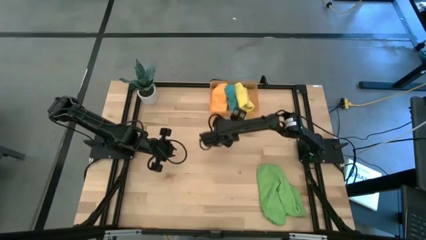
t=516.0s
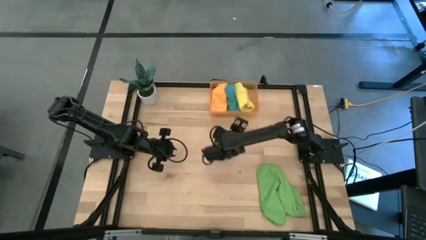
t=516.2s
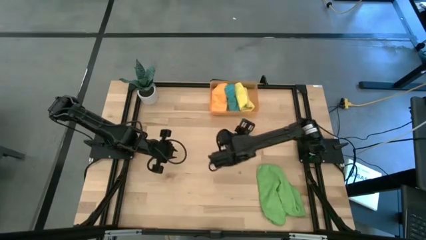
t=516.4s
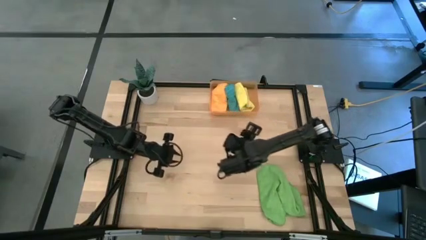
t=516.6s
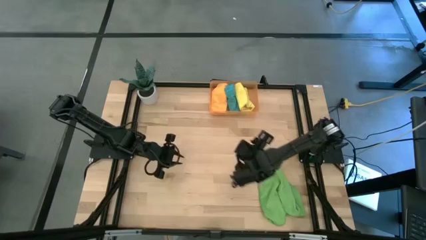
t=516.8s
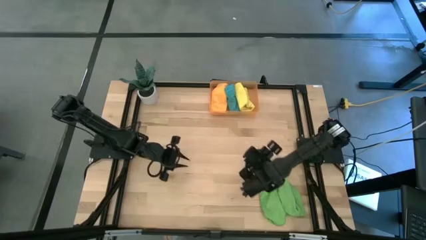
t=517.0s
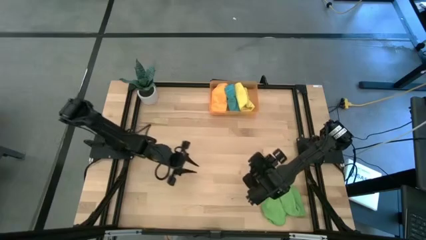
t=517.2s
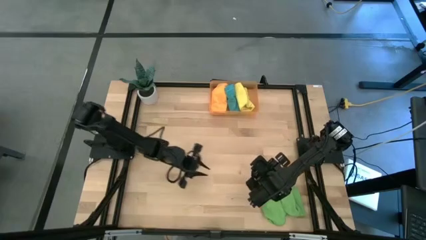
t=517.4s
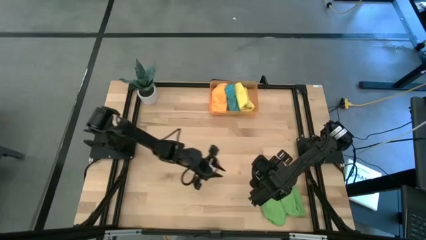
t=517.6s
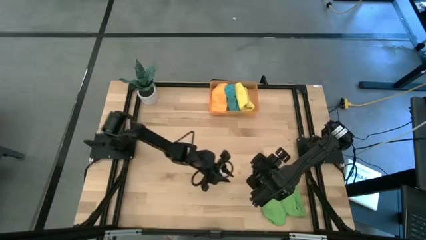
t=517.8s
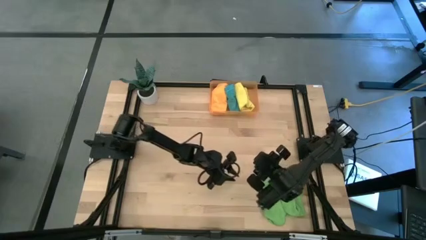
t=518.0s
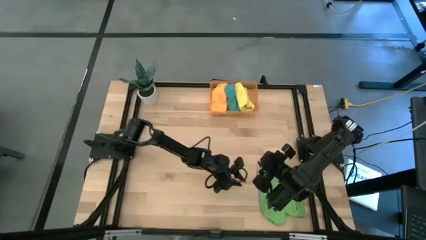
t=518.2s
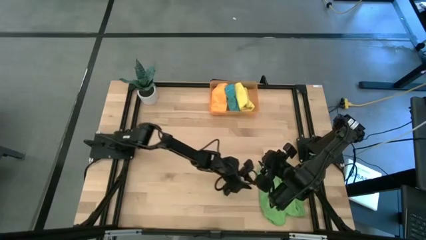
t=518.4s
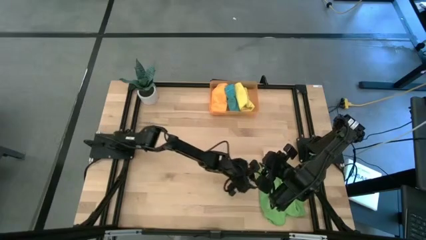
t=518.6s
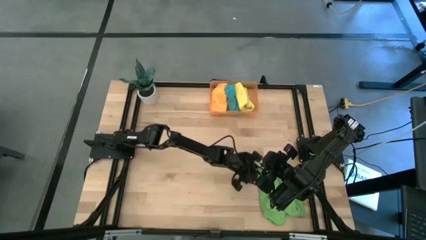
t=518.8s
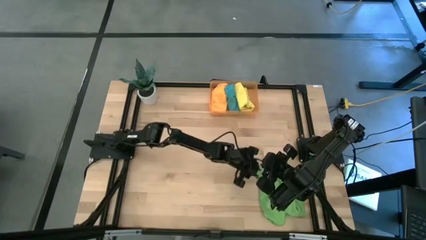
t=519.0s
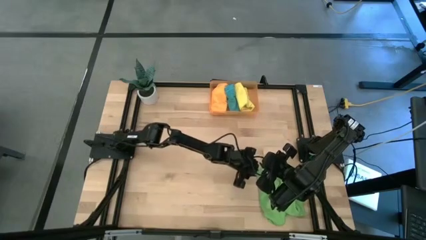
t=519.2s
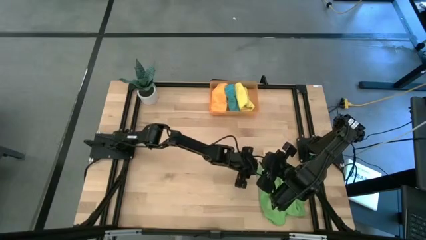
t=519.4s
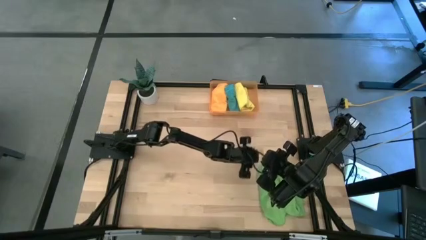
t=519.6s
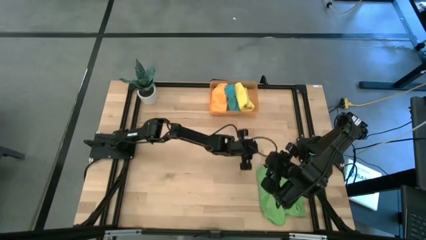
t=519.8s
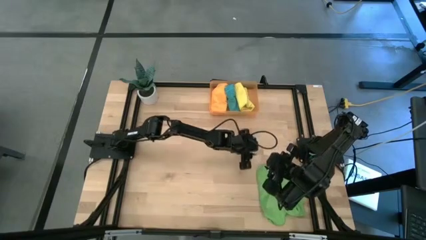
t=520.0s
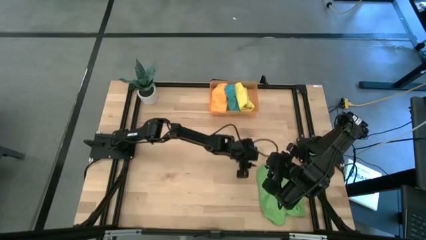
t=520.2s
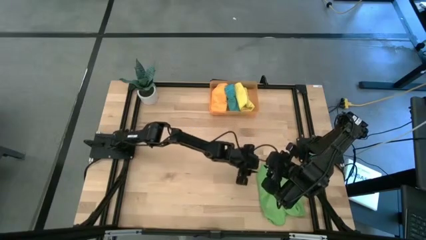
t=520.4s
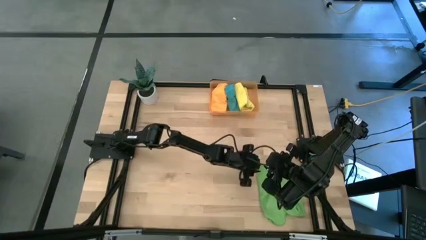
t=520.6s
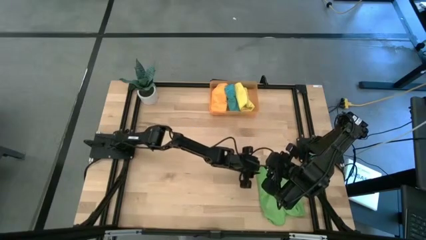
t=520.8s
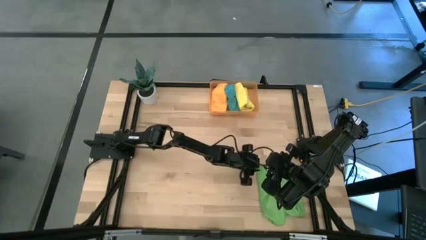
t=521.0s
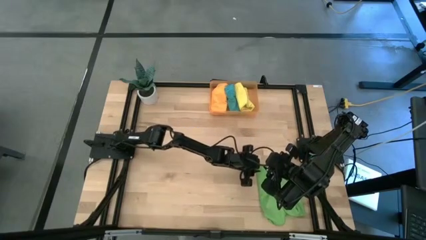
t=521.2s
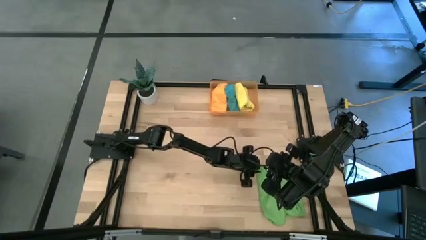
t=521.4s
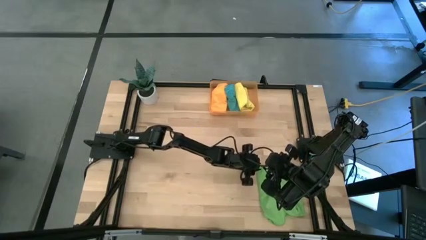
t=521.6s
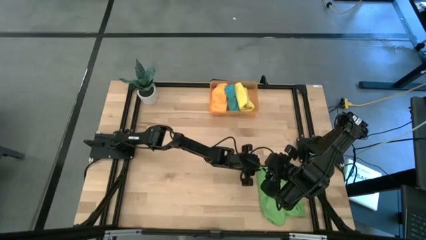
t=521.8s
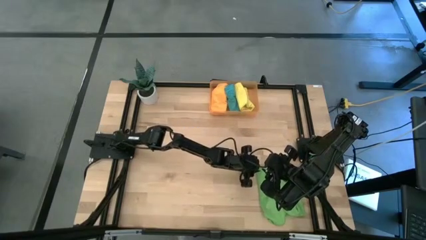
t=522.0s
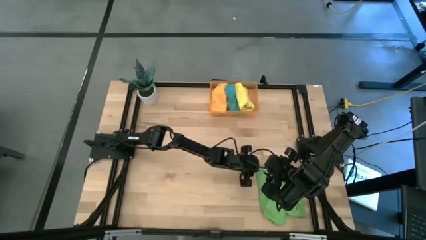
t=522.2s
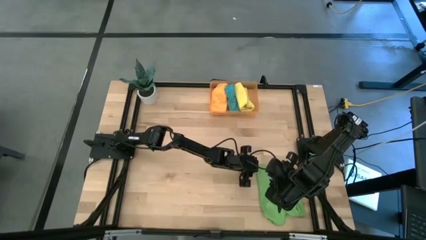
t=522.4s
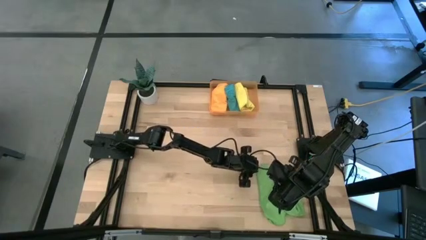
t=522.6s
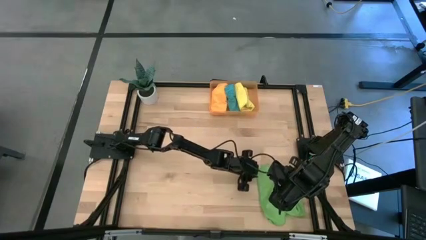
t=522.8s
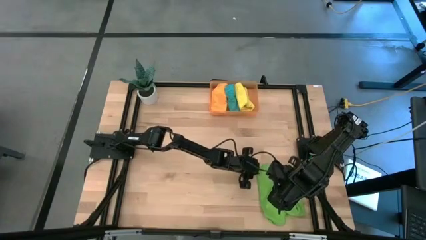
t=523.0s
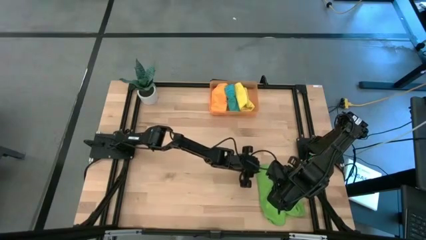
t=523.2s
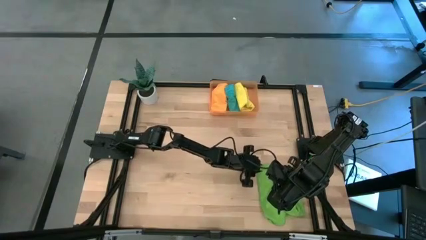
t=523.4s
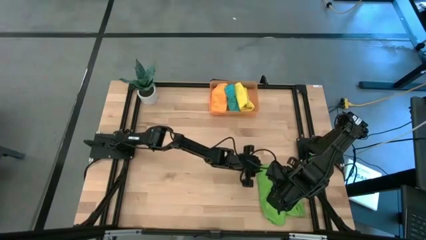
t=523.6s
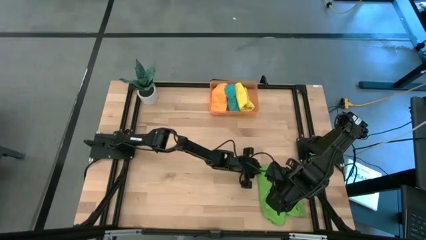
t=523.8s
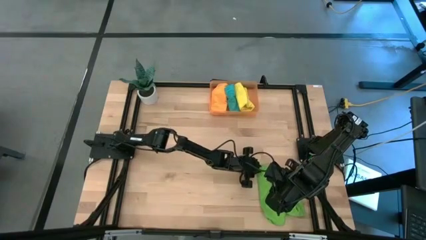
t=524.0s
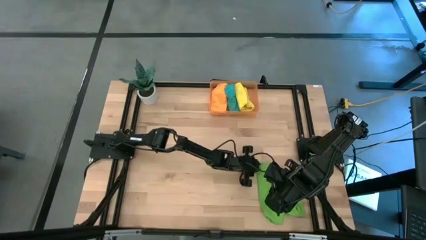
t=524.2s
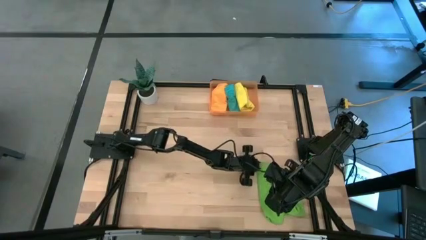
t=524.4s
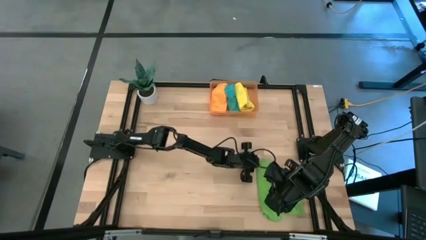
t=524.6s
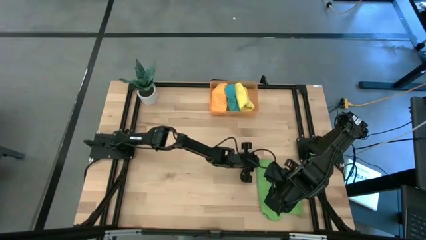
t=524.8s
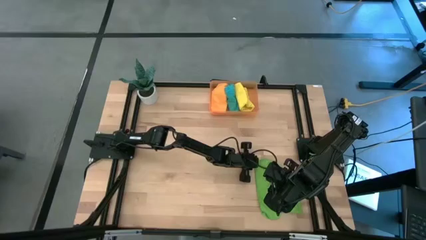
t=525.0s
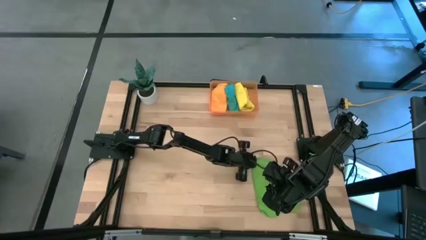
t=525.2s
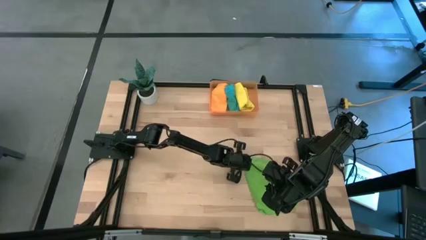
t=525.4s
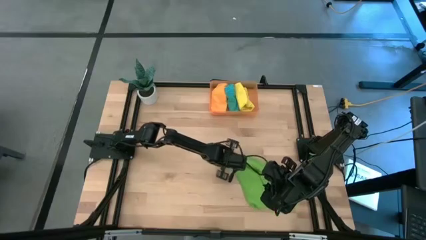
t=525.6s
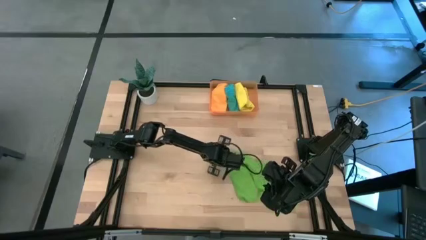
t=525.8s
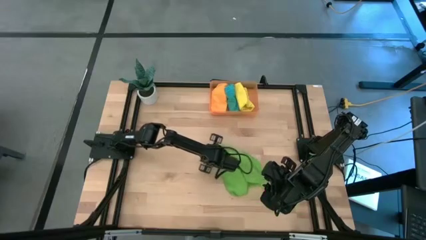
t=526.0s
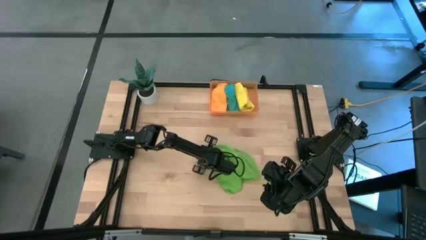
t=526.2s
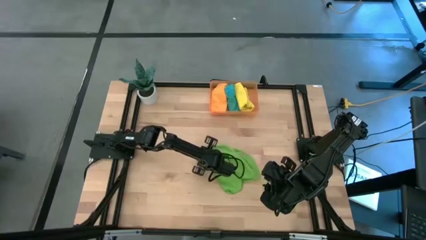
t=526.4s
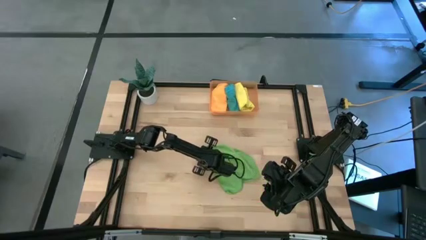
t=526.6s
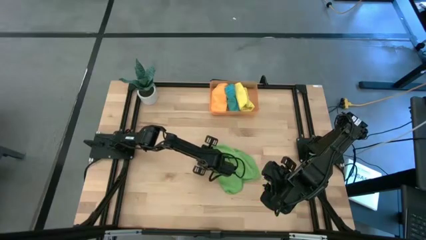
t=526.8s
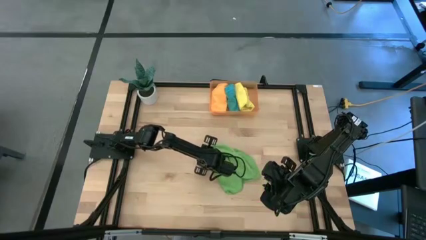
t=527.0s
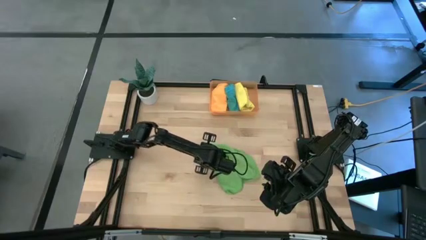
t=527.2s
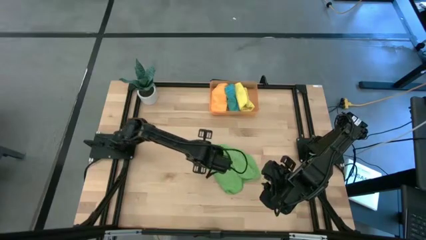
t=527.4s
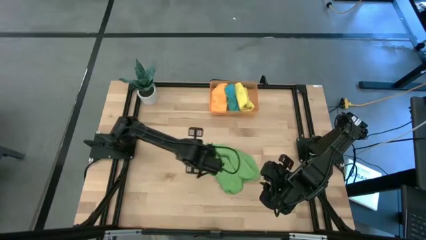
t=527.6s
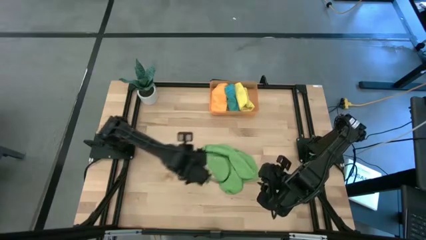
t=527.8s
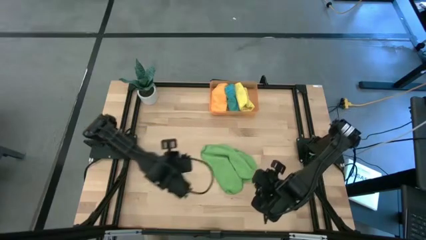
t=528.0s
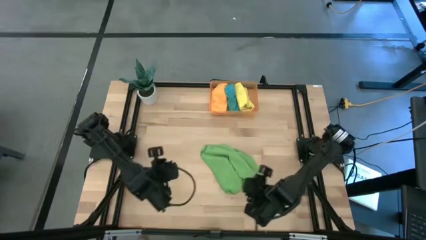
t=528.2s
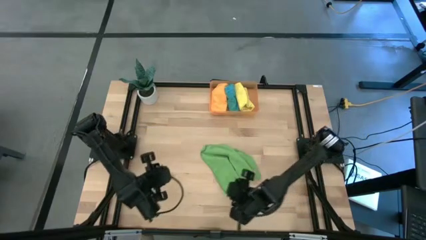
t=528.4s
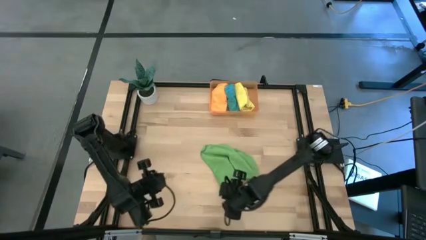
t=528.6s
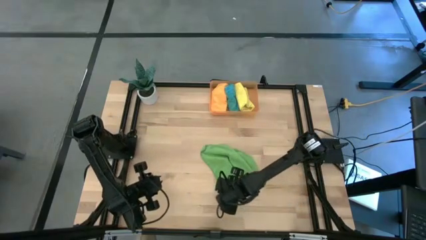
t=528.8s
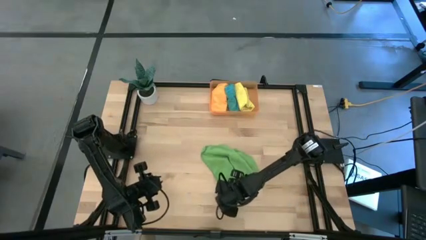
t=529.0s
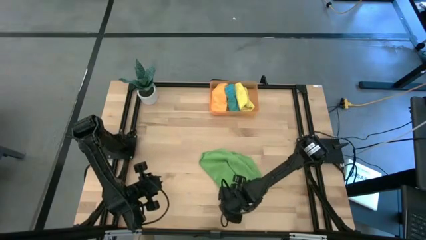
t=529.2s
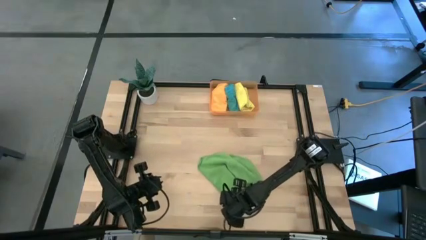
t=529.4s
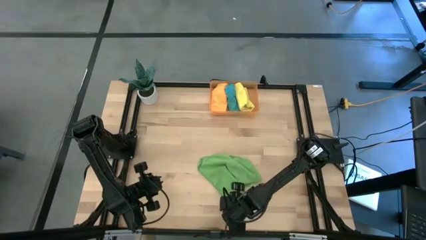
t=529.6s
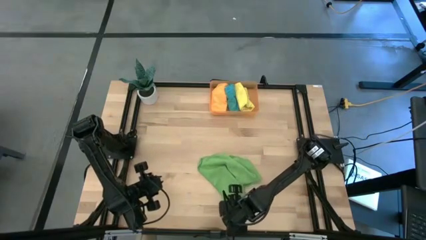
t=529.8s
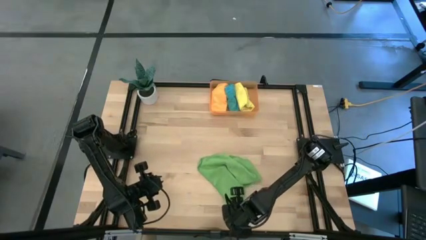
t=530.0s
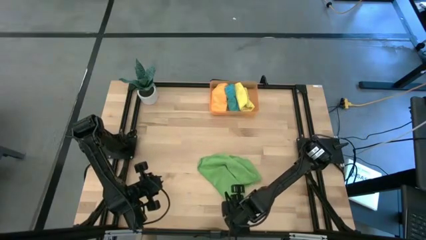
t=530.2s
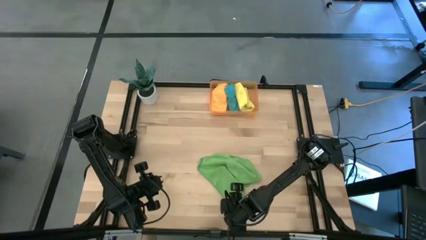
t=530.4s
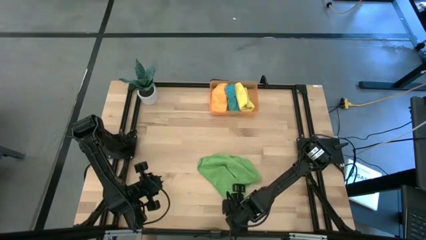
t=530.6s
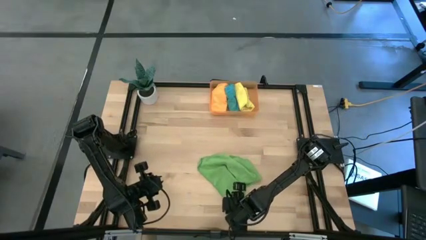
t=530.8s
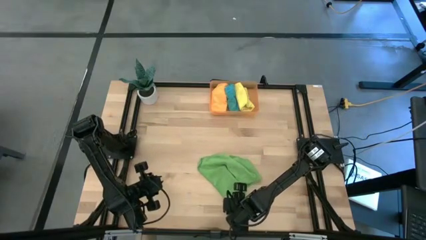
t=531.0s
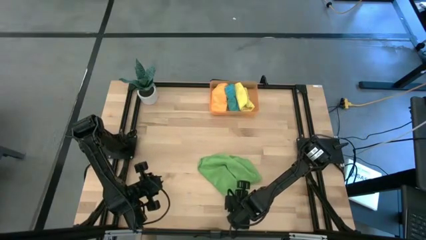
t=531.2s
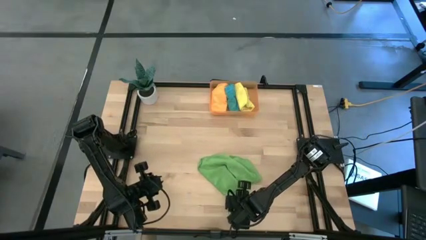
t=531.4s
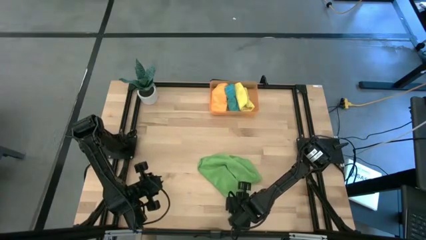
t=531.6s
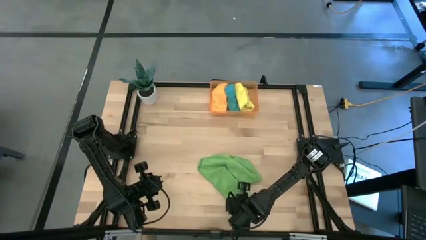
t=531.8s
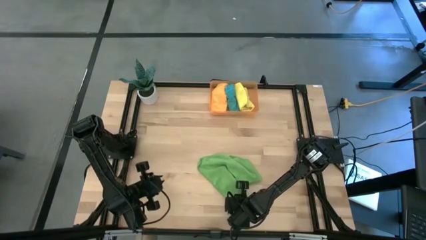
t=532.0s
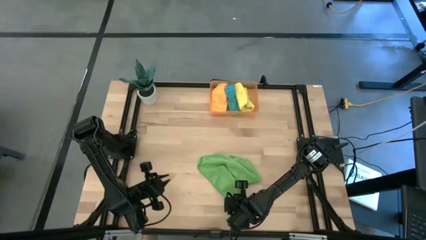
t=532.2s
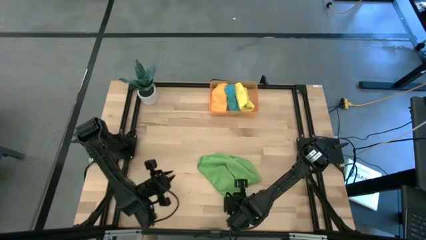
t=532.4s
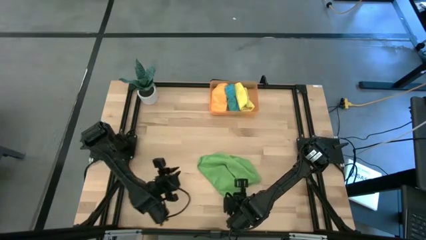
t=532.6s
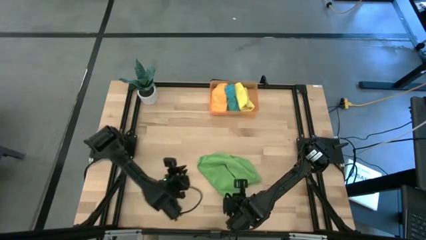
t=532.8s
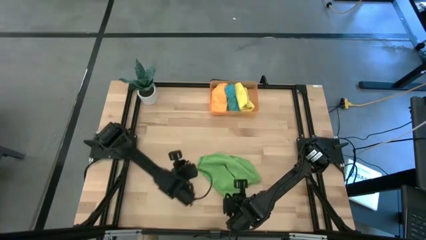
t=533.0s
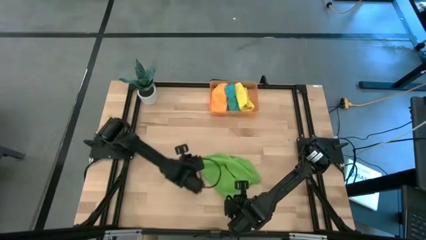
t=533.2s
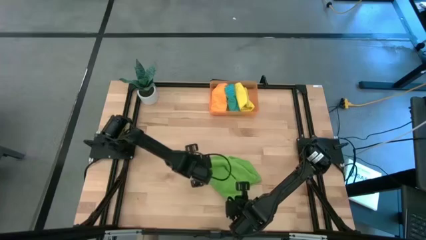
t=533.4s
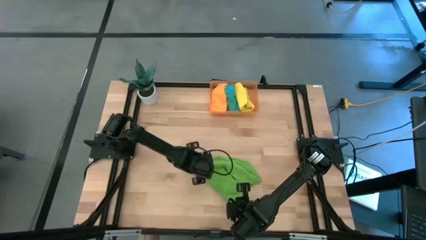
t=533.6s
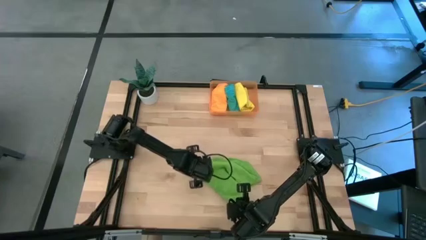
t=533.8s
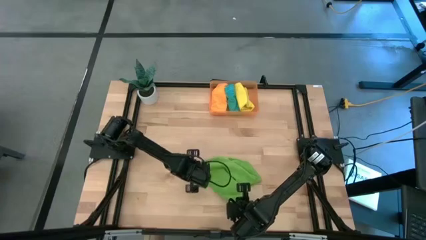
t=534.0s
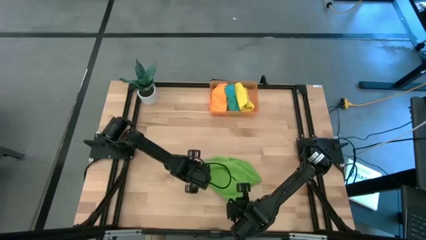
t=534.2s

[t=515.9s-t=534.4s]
Task: Roll microfiber towels into tight, uniform cylinder then place into a basket
Roll the green microfiber towel
